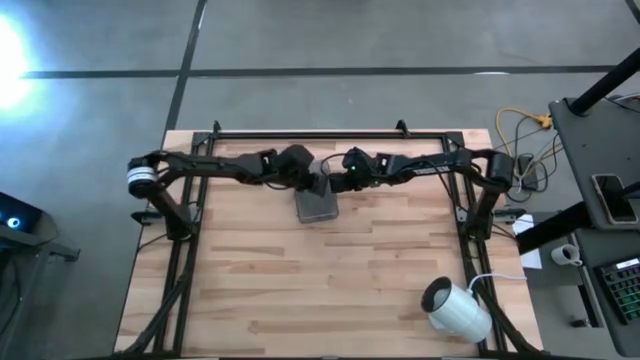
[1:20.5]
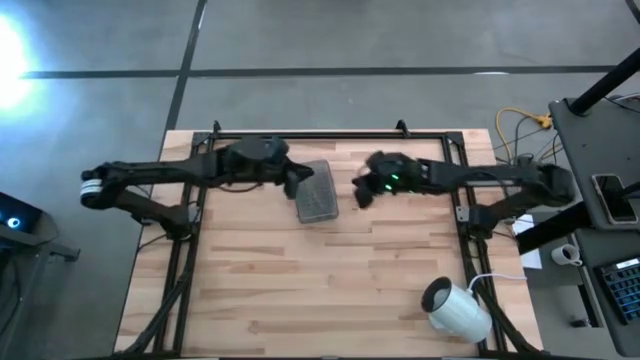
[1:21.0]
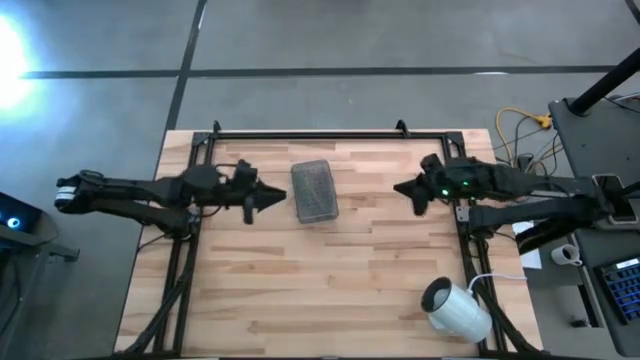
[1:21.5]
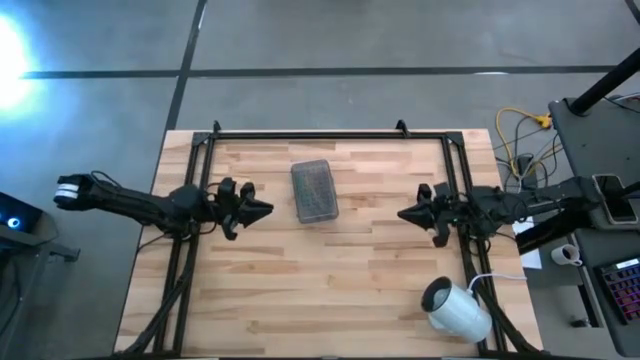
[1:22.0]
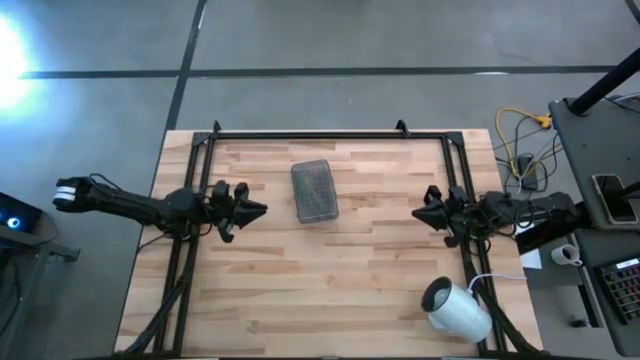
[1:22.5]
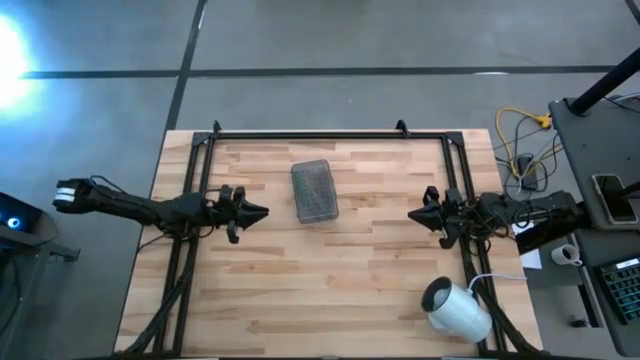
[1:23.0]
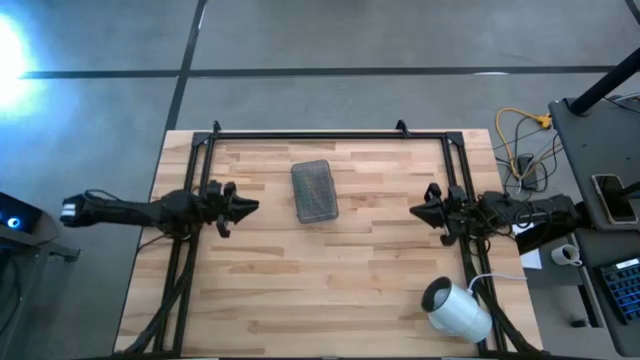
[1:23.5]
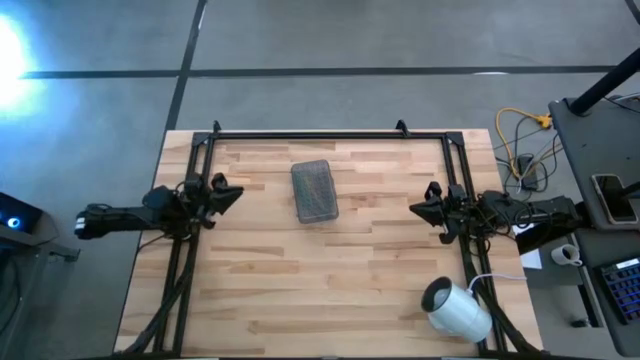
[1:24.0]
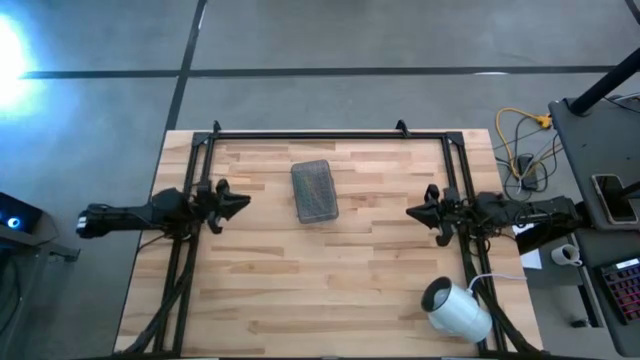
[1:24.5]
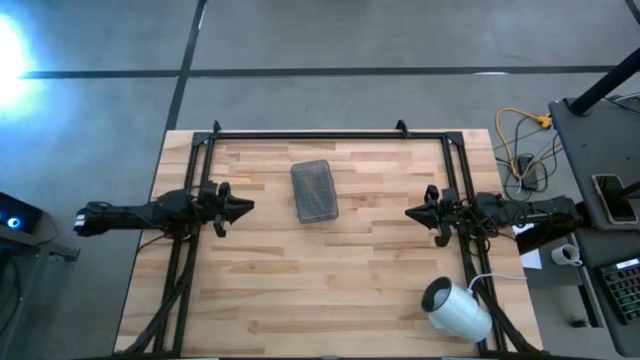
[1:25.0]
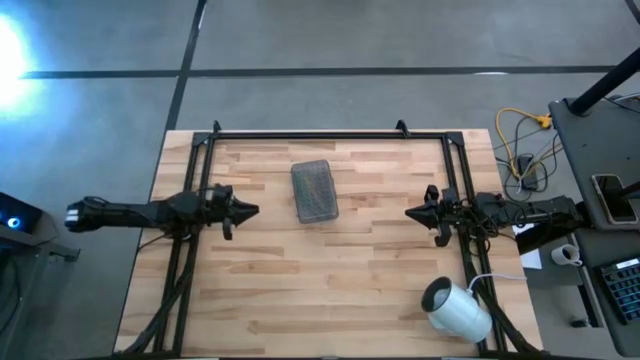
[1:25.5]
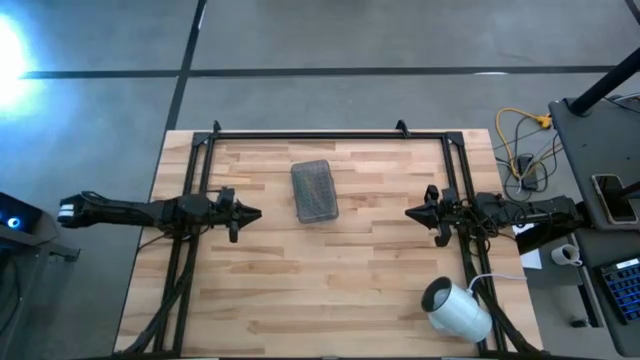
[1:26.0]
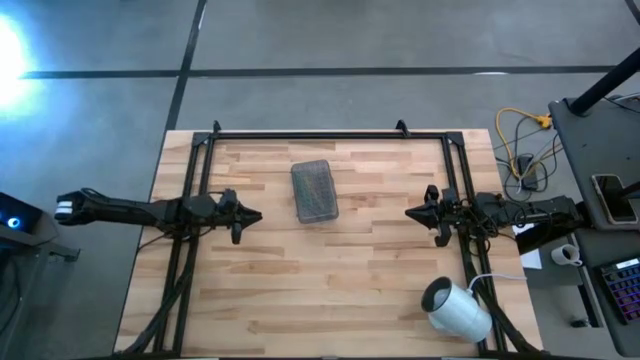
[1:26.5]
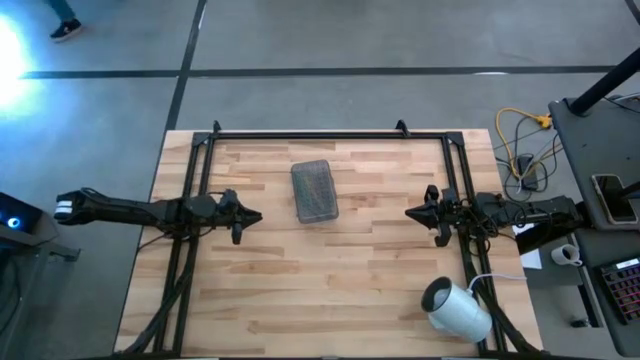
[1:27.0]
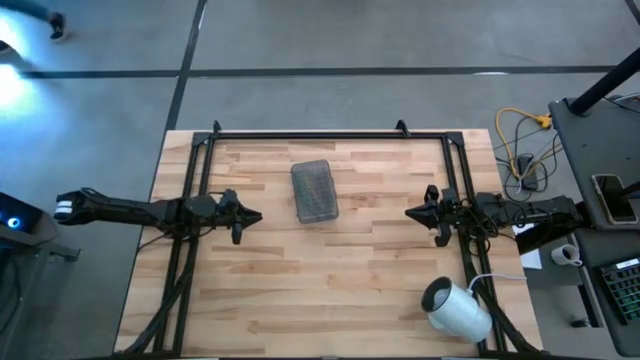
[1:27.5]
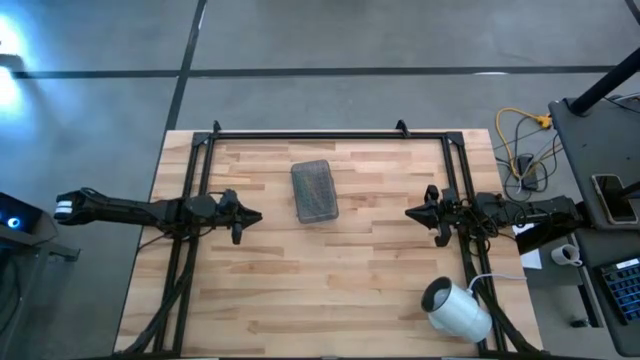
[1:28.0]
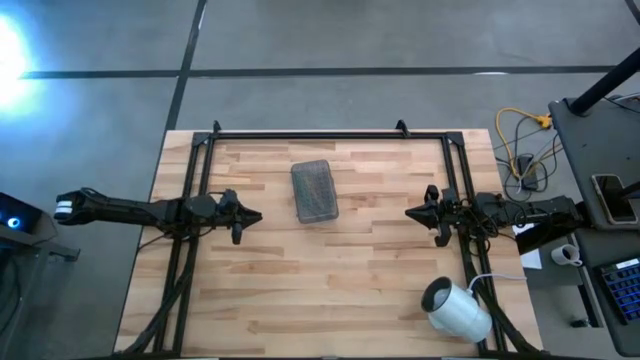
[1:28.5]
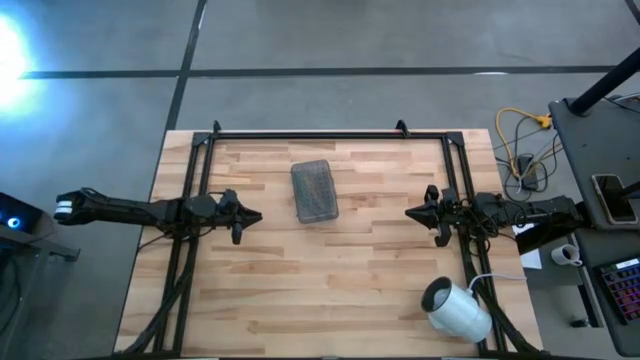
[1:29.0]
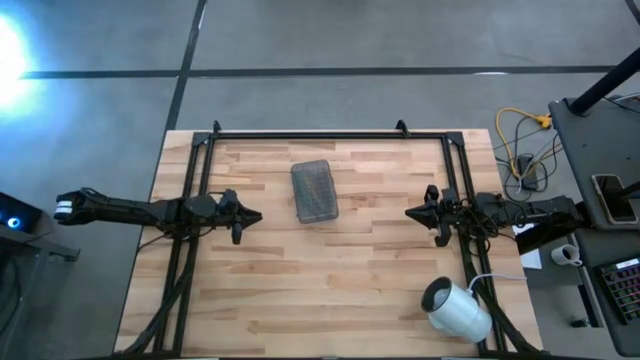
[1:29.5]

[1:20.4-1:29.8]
Task: Pick & place school supplies into a supply box
Return to Home Position

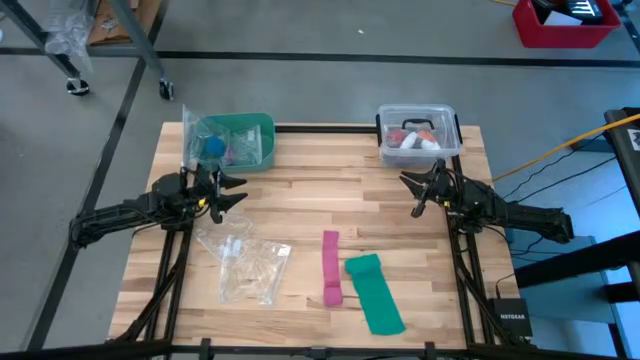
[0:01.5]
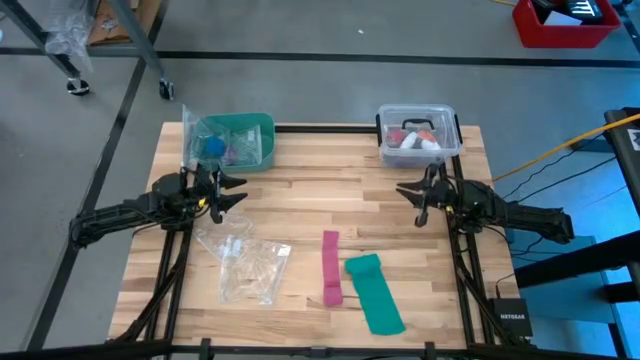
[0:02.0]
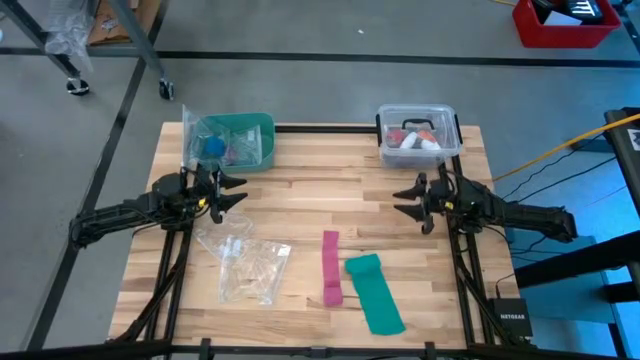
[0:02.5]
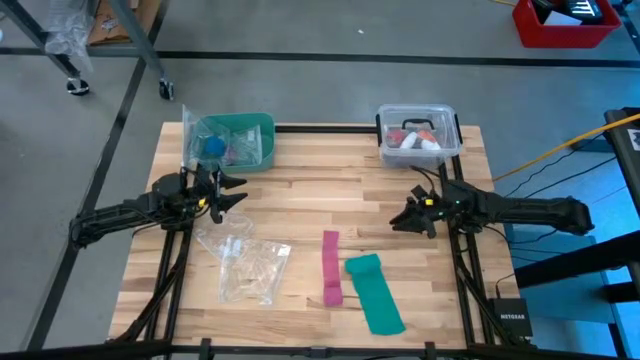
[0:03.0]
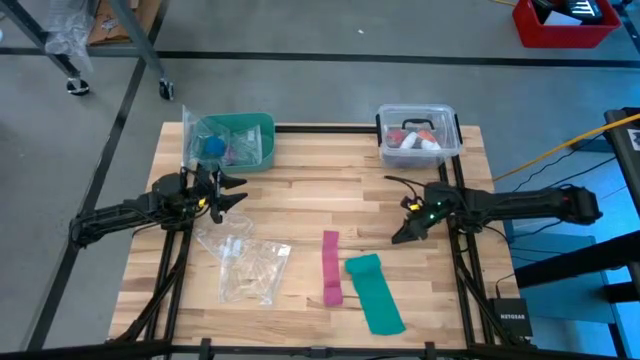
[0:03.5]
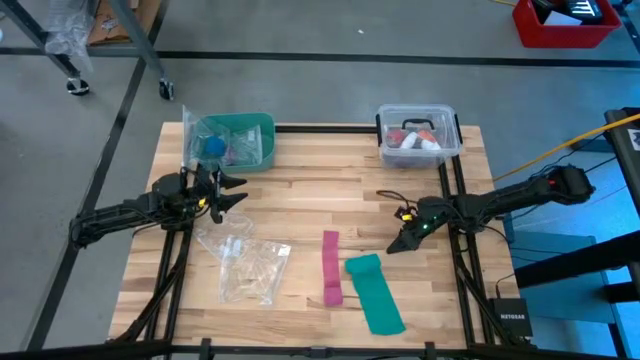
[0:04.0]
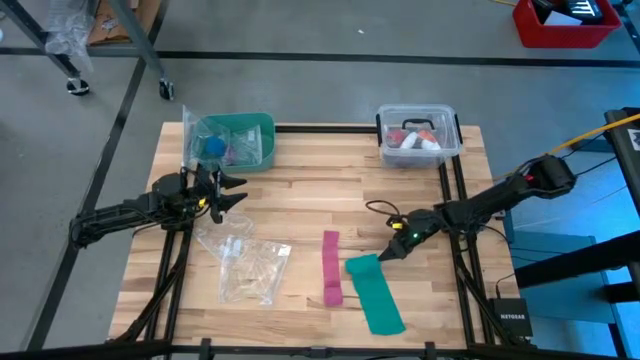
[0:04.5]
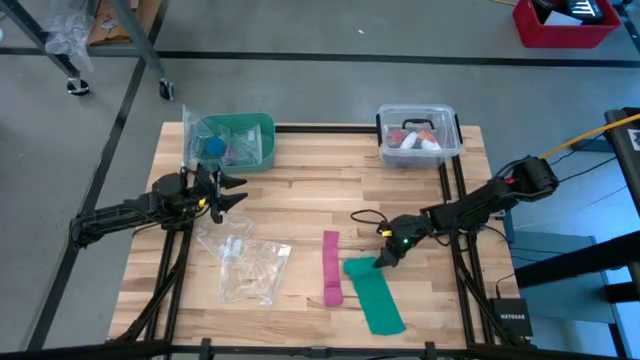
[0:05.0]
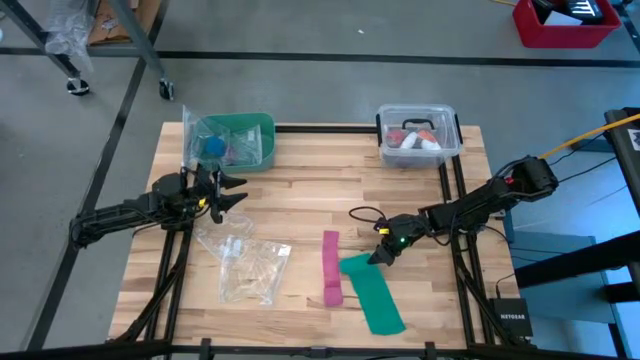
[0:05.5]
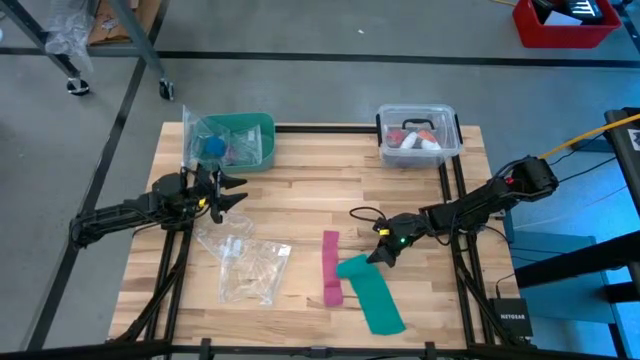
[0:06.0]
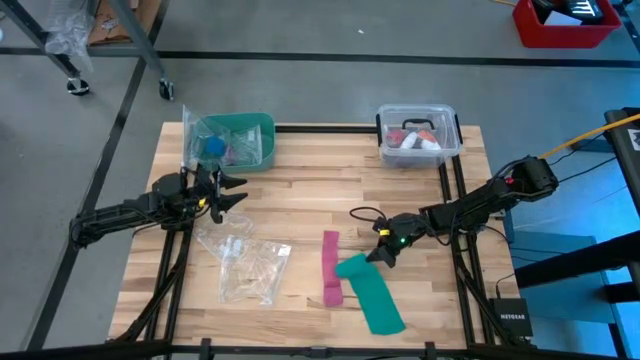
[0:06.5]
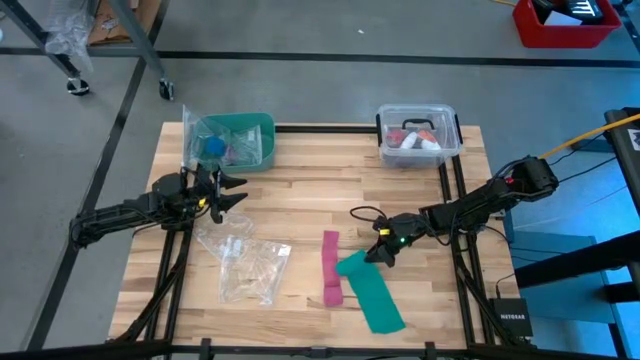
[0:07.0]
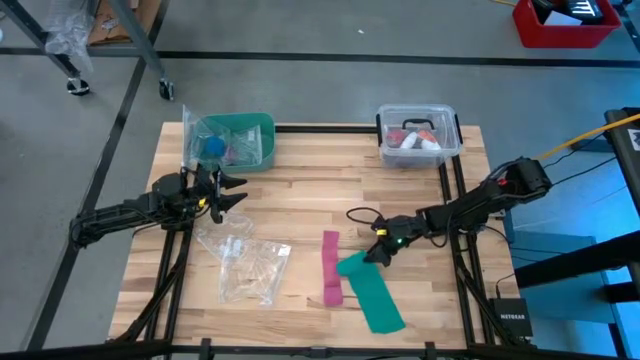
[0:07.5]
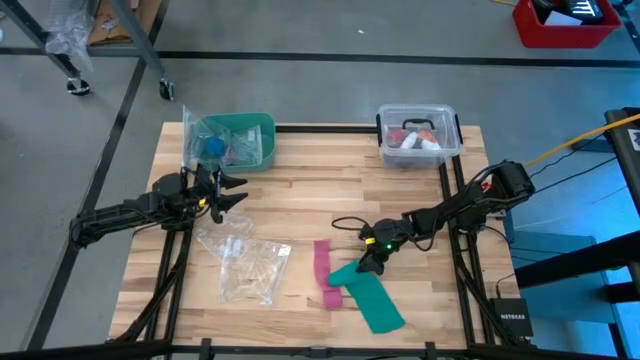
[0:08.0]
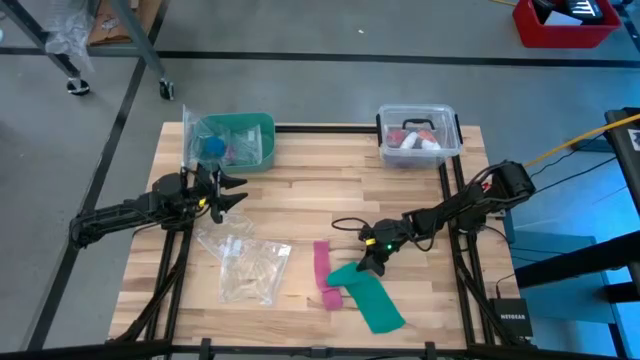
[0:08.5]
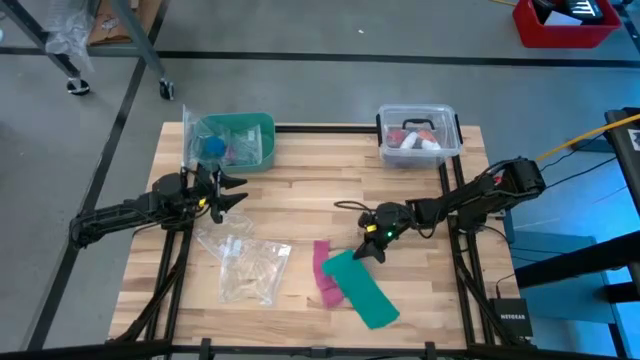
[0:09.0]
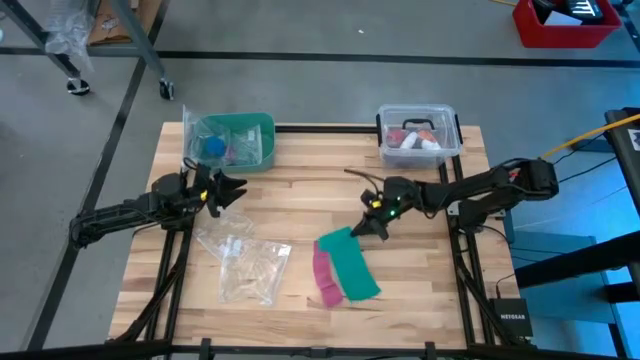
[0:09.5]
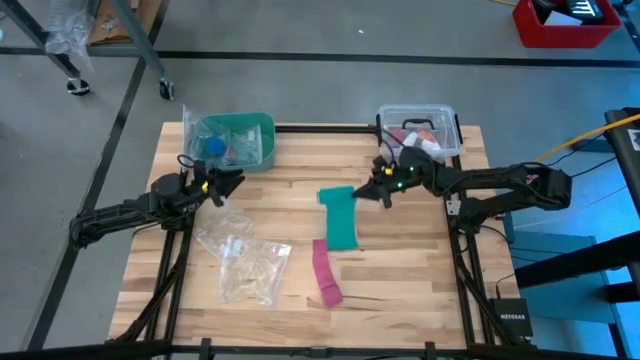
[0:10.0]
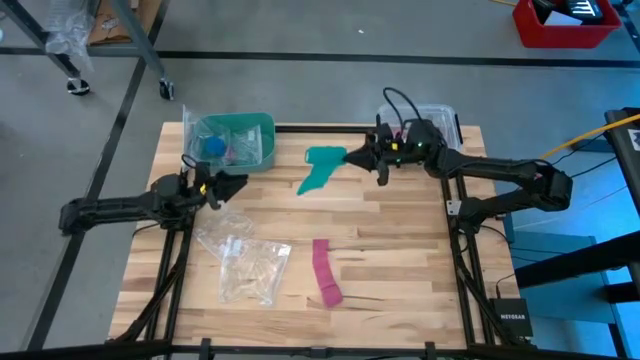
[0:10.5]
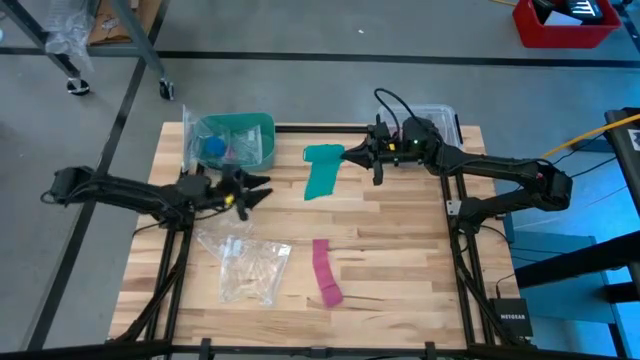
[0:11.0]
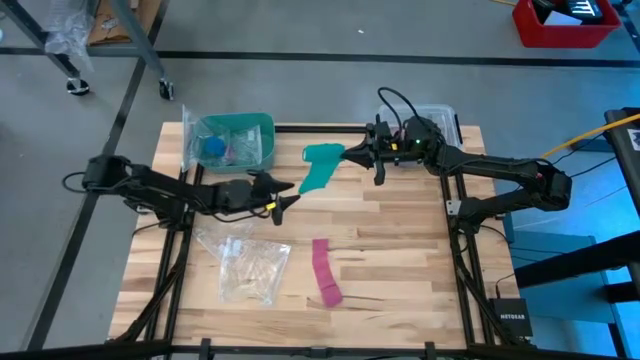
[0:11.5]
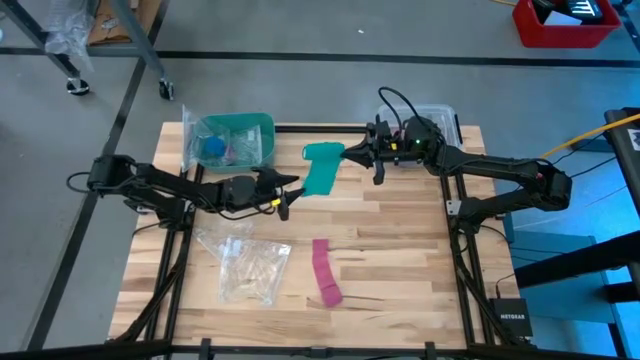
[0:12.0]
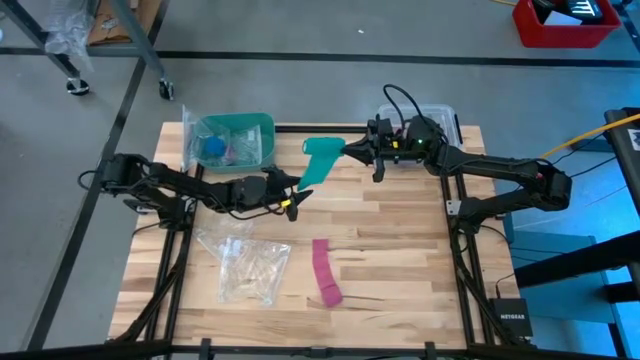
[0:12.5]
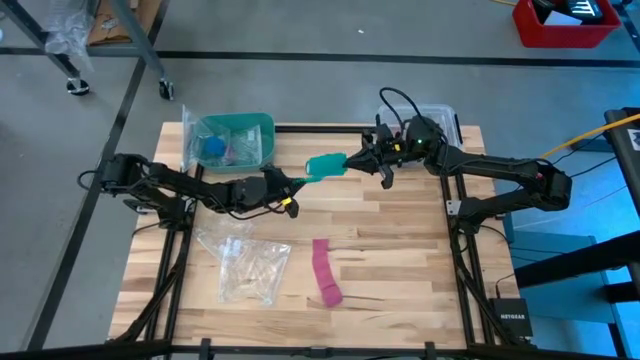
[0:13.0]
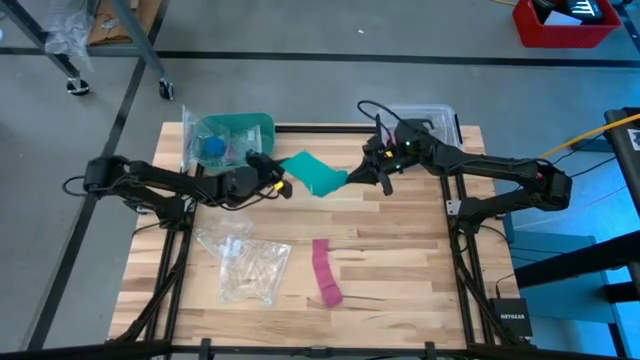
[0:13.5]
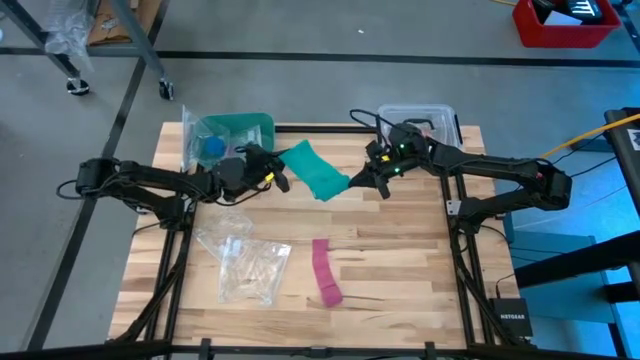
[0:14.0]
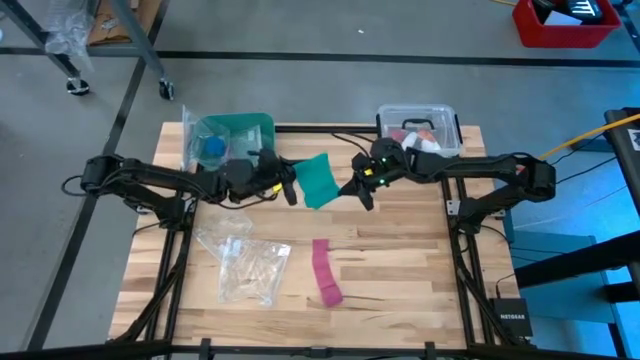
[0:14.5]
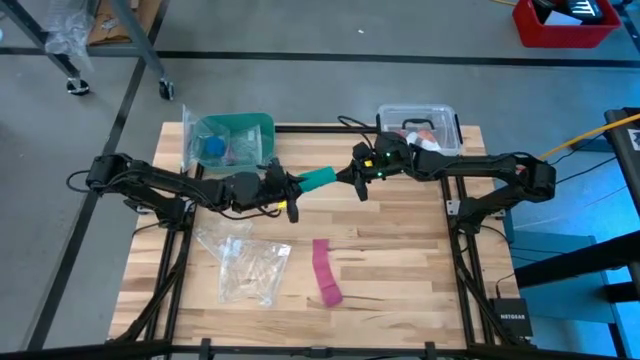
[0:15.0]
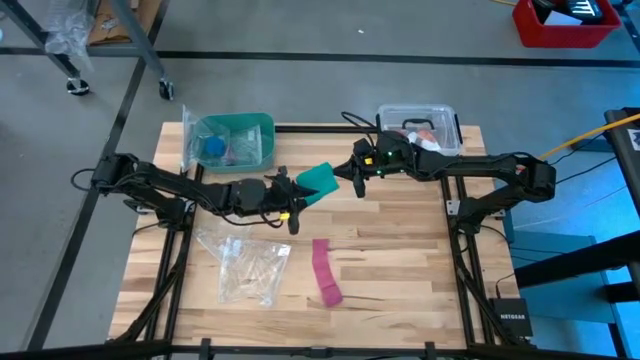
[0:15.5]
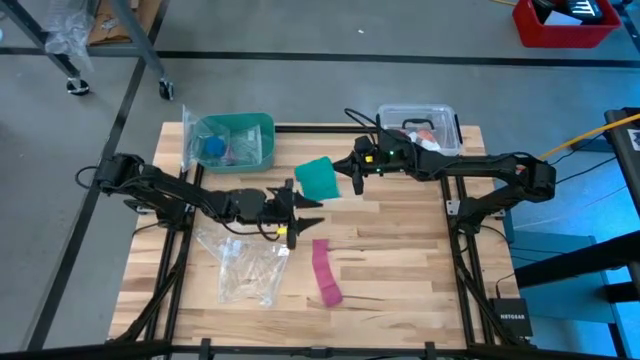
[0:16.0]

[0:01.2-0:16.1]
Task: Roll bandage
Roll the green bandage
